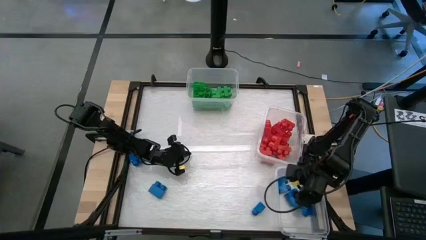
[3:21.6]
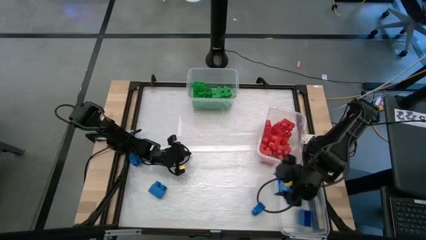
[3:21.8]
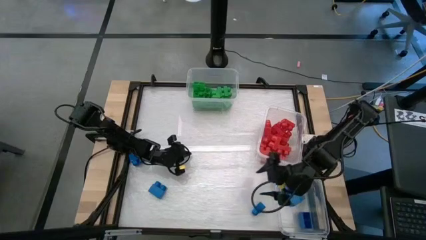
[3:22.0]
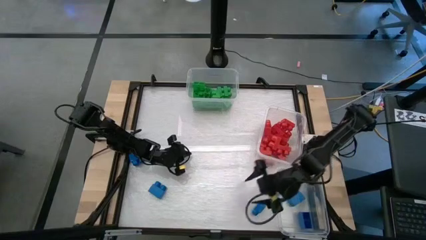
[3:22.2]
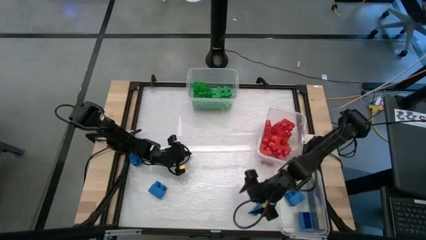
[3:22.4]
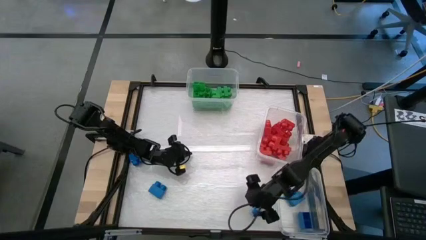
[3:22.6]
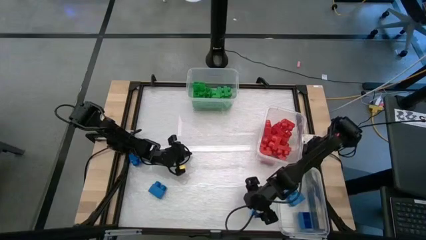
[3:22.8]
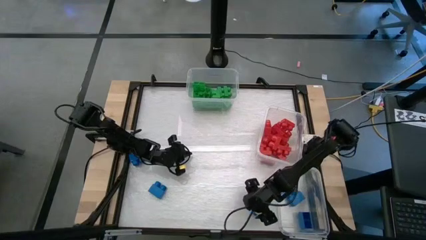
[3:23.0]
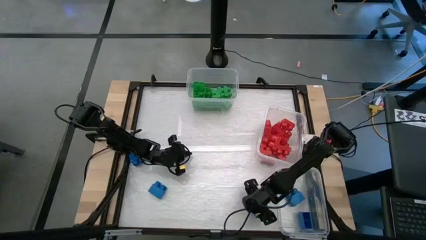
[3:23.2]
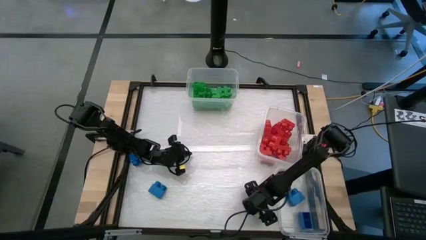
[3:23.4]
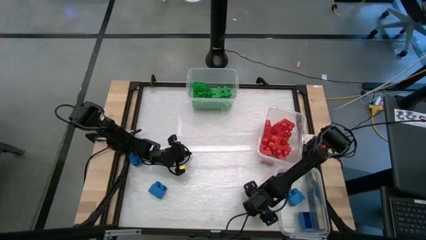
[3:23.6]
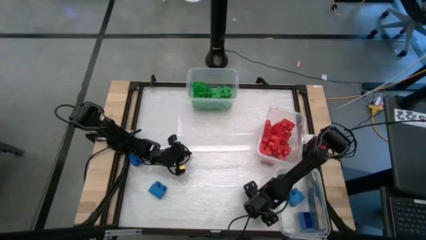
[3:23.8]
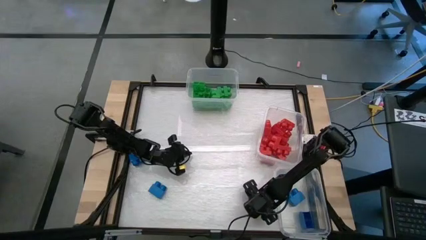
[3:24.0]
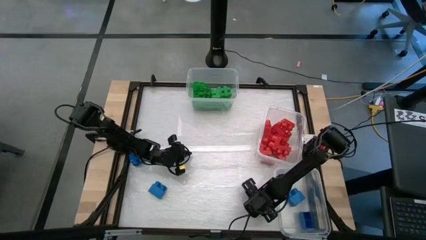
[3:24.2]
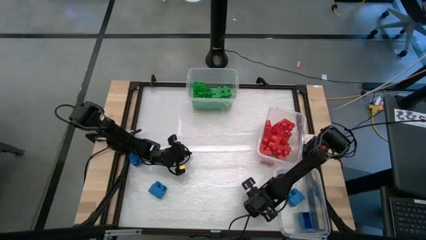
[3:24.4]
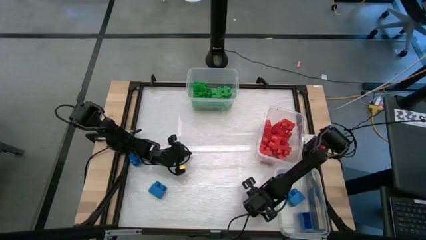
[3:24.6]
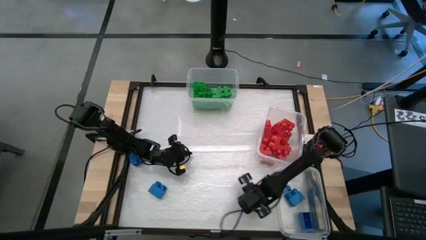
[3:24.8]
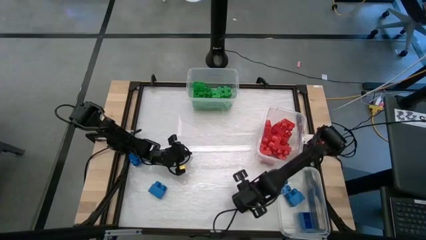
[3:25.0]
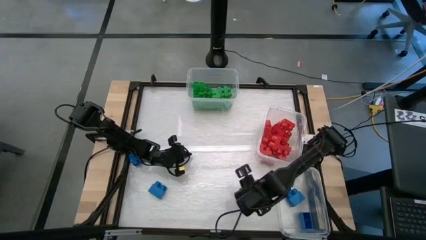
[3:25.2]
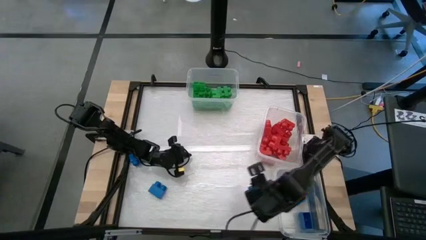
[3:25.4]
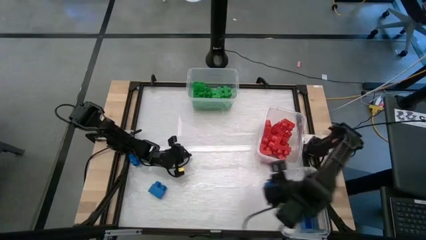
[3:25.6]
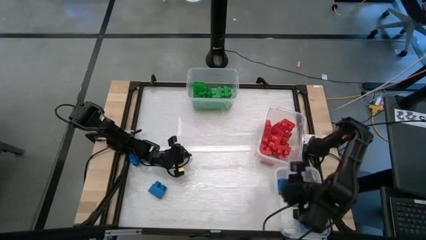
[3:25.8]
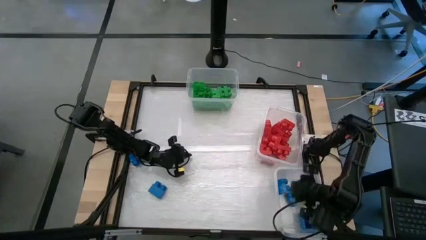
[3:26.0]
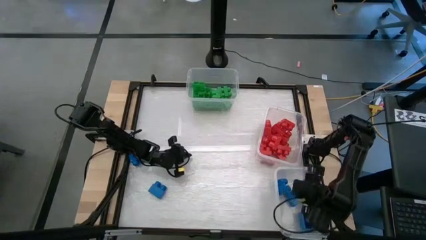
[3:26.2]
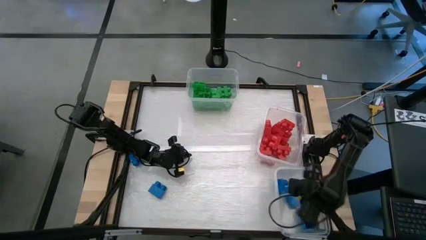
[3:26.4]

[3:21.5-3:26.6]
Task: Sort blocks
Put the blue game piece into the bottom right transparent bin

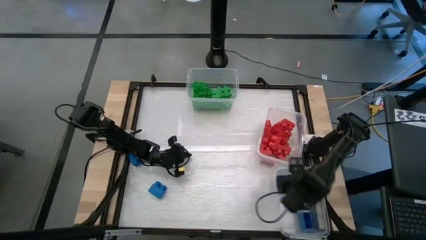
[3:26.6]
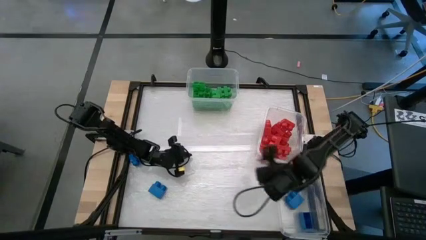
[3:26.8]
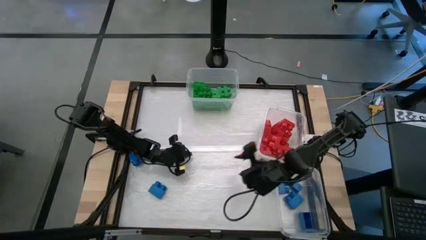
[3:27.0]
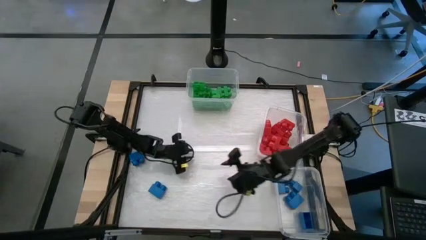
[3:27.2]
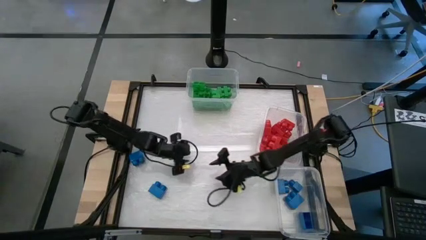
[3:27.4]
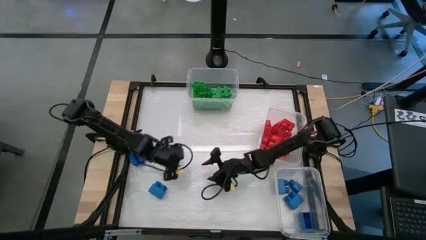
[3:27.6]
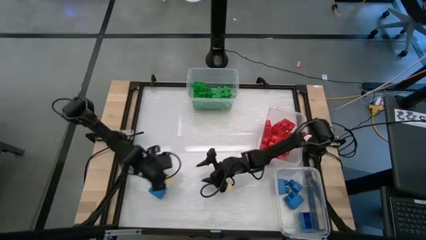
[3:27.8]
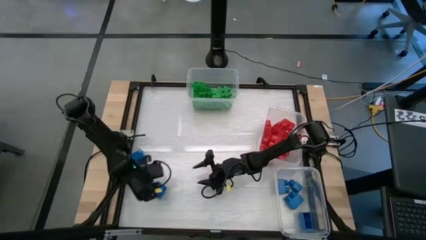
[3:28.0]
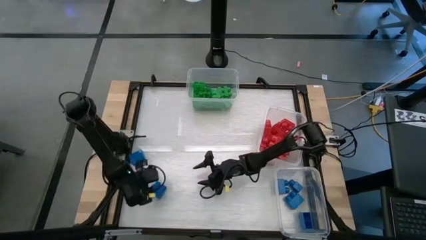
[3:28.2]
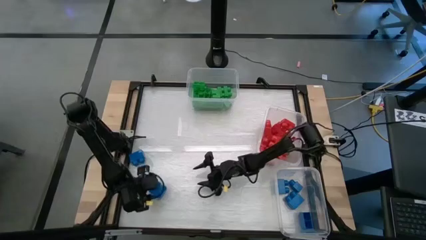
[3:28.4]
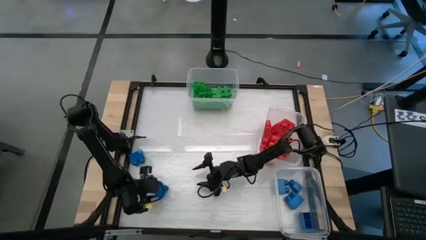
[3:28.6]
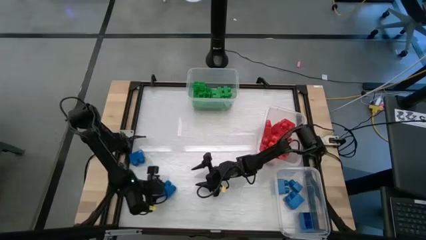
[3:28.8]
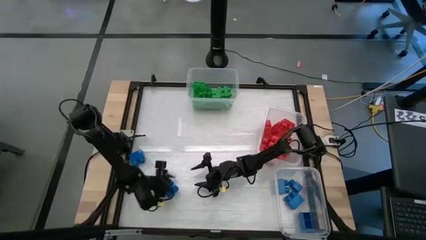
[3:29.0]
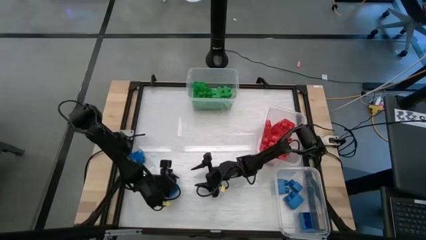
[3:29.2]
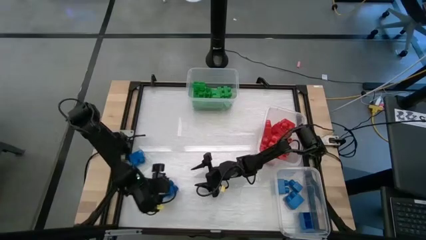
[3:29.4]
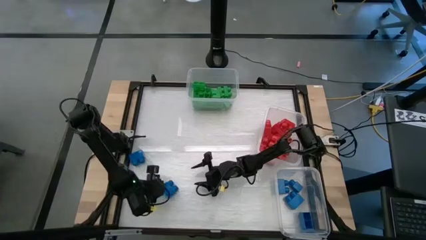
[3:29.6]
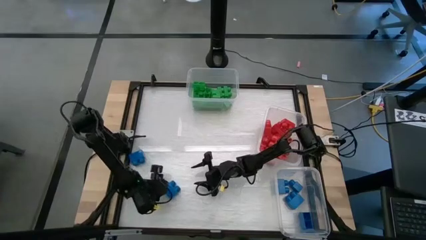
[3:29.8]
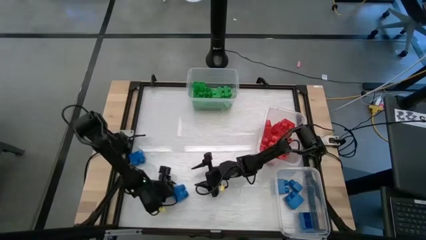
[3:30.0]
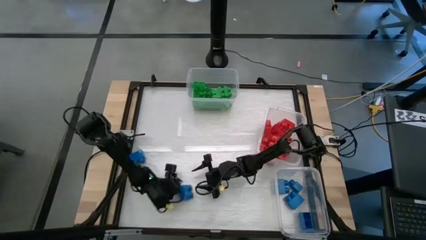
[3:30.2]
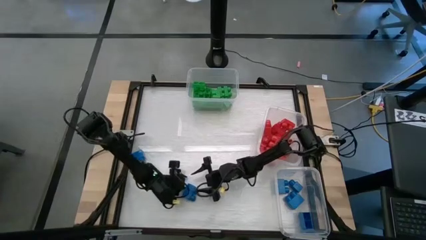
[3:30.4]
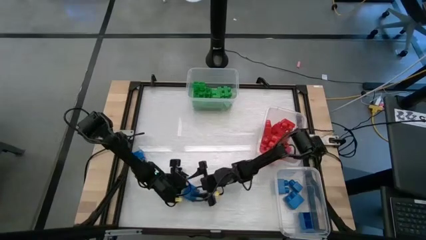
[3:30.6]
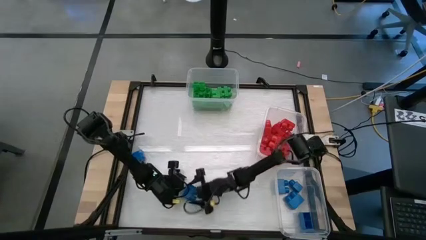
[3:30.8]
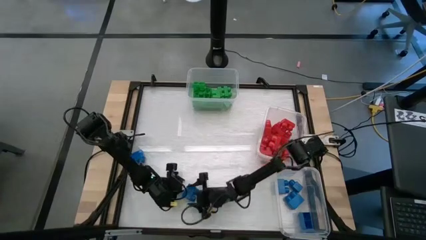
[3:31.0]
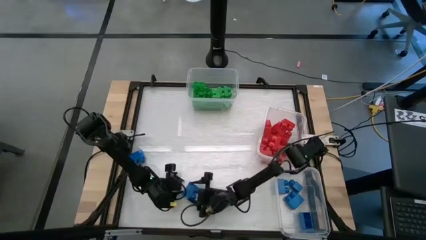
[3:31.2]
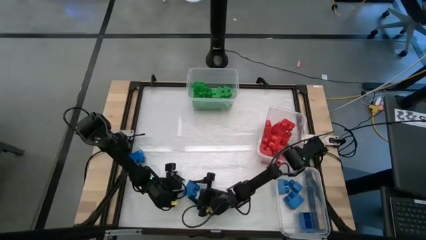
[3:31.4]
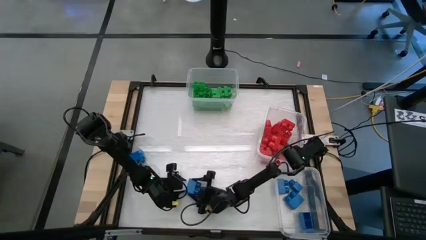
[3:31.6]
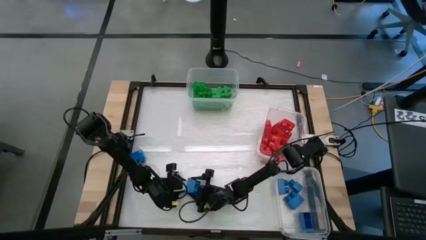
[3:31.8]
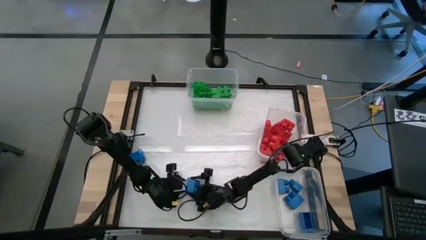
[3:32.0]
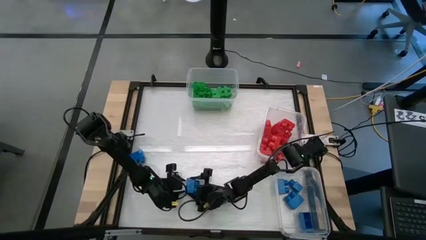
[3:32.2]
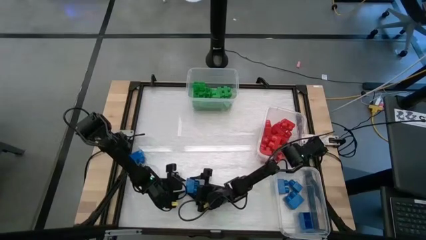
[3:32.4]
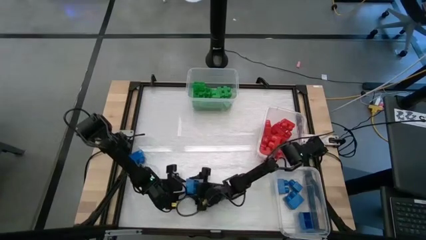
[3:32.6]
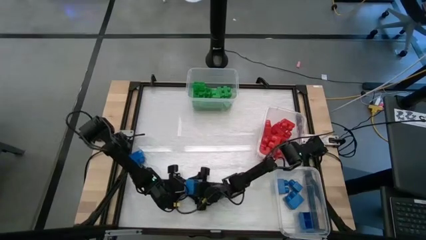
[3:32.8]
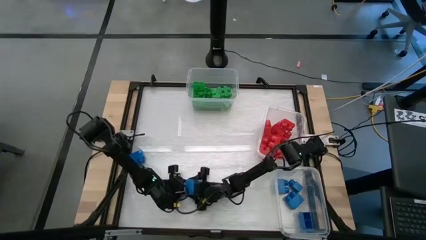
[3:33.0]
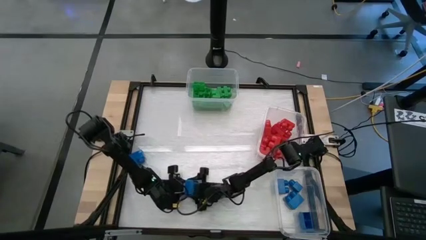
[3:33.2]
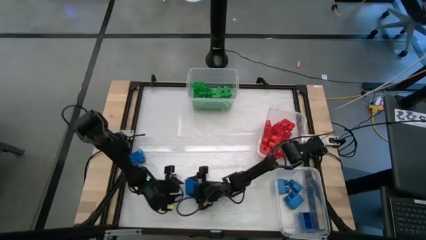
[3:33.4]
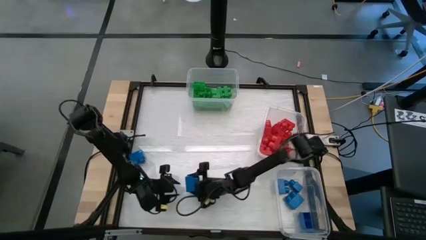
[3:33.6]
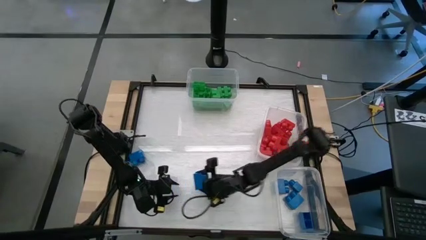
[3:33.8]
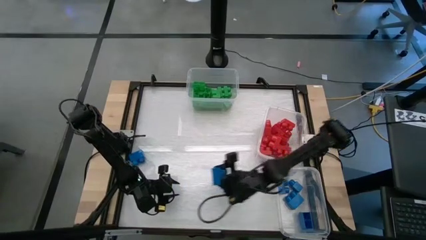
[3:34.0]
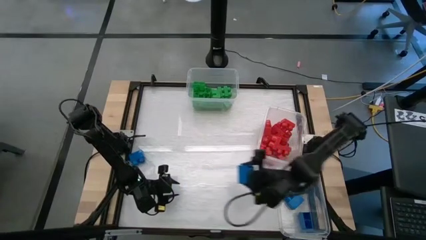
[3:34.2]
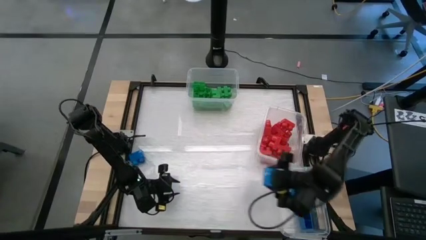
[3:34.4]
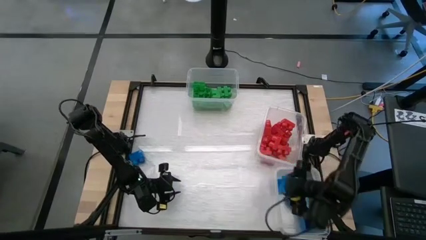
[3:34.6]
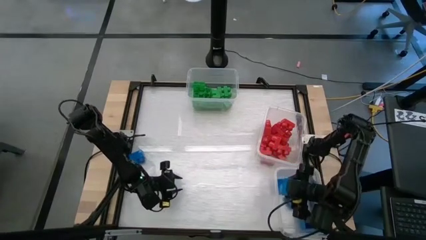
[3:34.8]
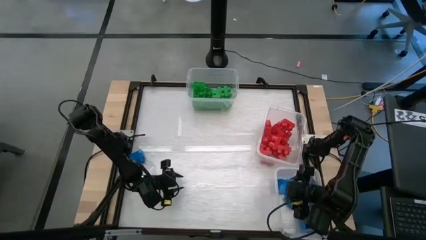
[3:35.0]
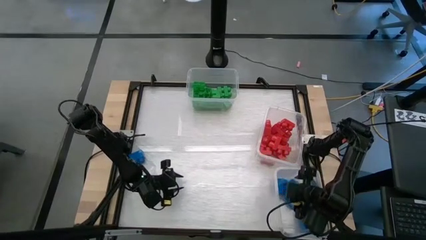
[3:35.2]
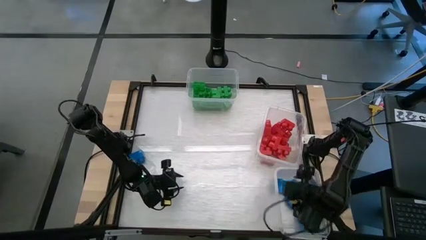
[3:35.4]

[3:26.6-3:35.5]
Put the blue game piece into the bottom right transparent bin
